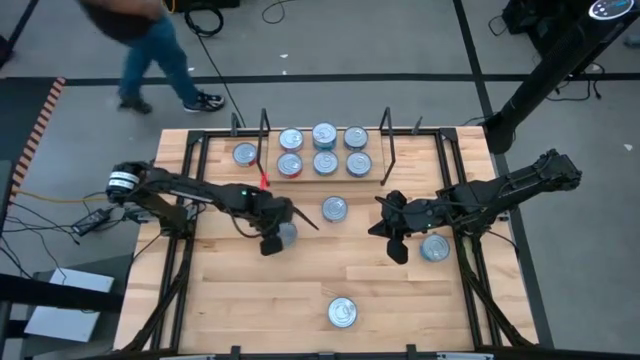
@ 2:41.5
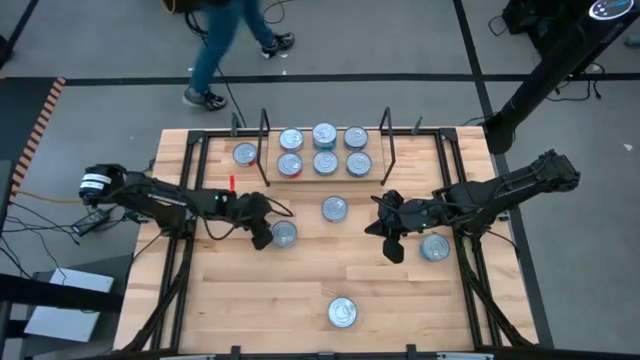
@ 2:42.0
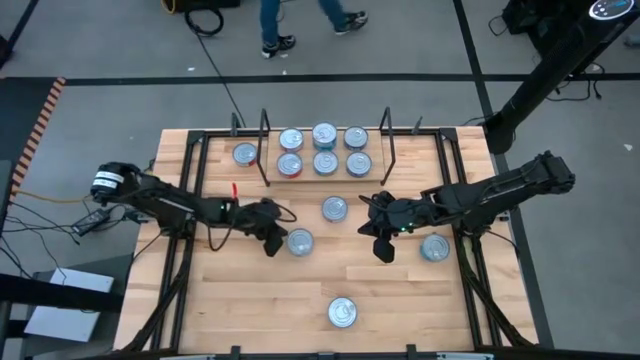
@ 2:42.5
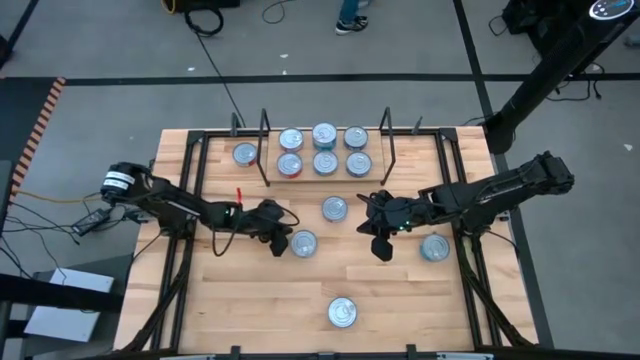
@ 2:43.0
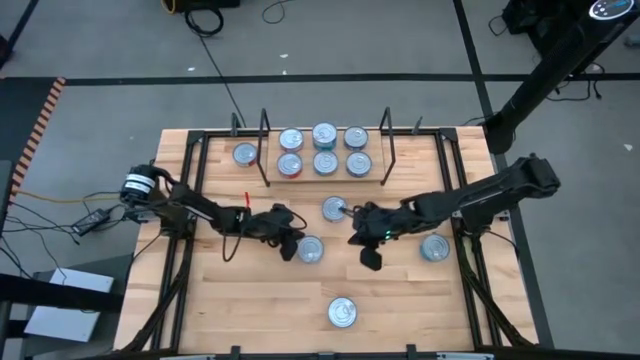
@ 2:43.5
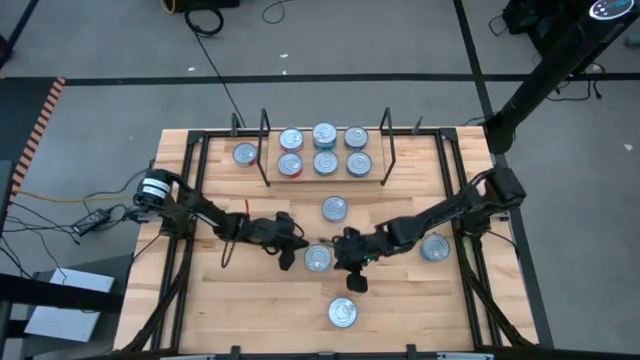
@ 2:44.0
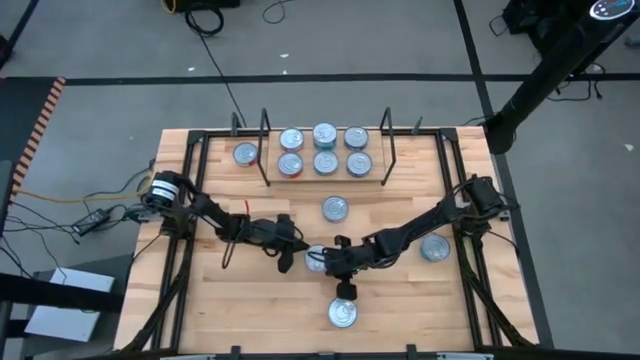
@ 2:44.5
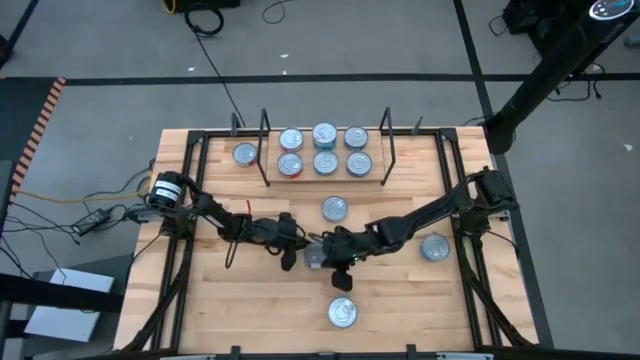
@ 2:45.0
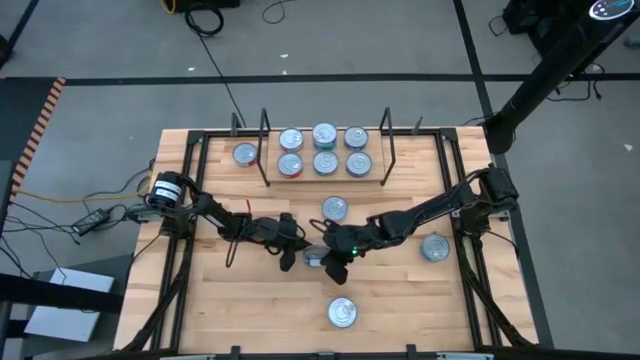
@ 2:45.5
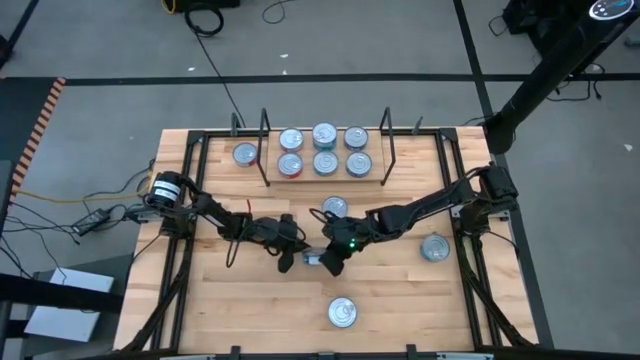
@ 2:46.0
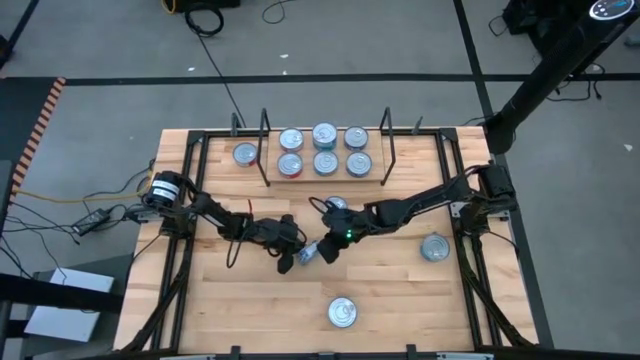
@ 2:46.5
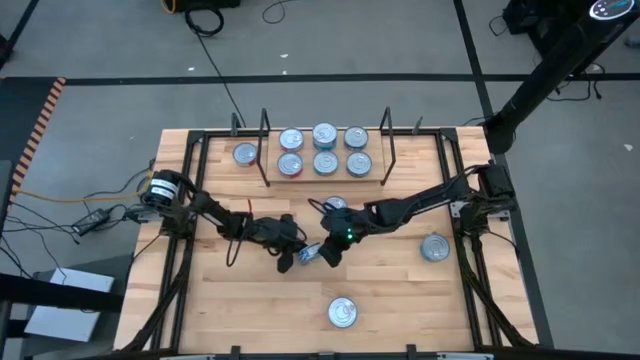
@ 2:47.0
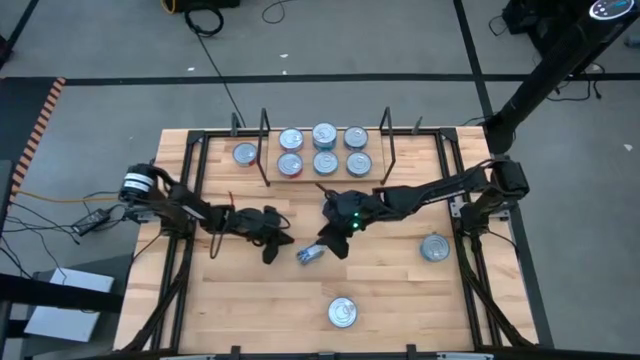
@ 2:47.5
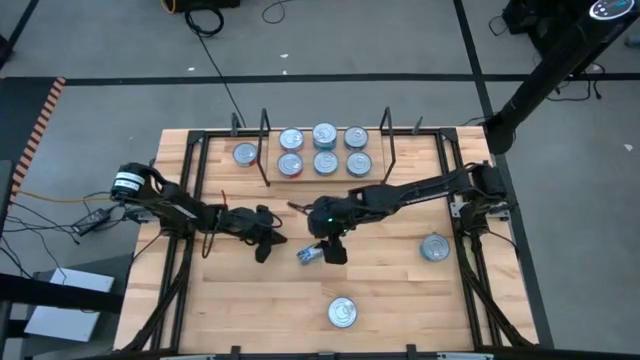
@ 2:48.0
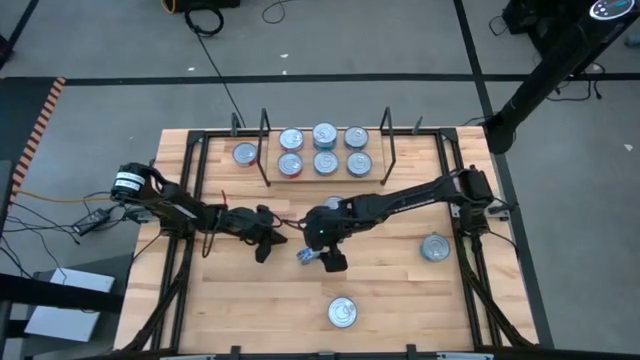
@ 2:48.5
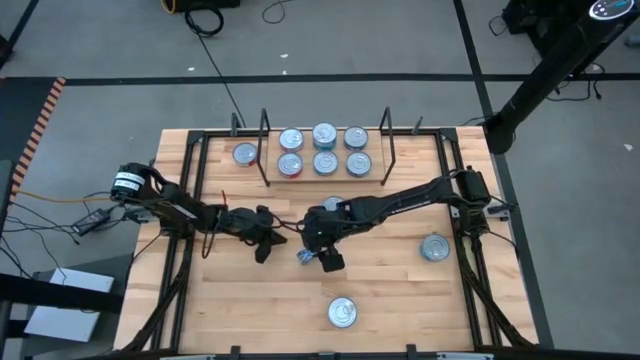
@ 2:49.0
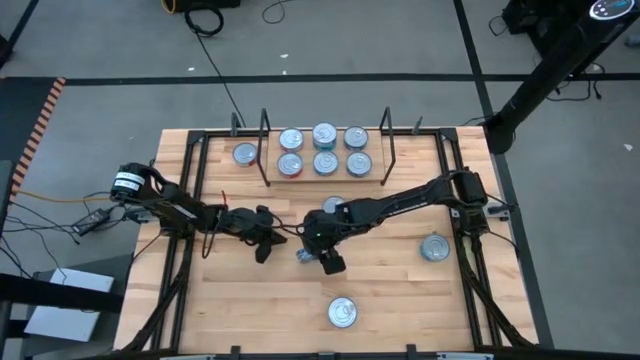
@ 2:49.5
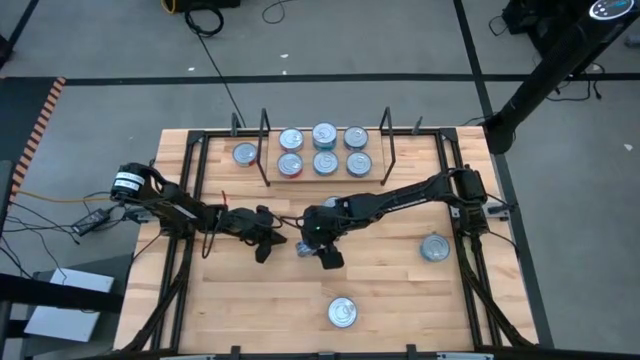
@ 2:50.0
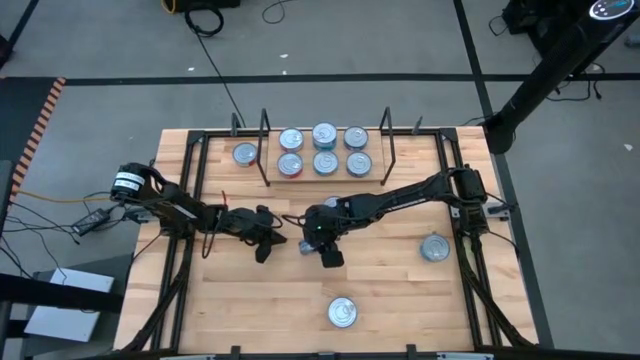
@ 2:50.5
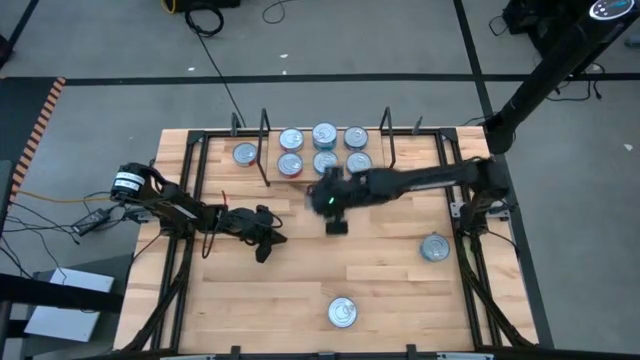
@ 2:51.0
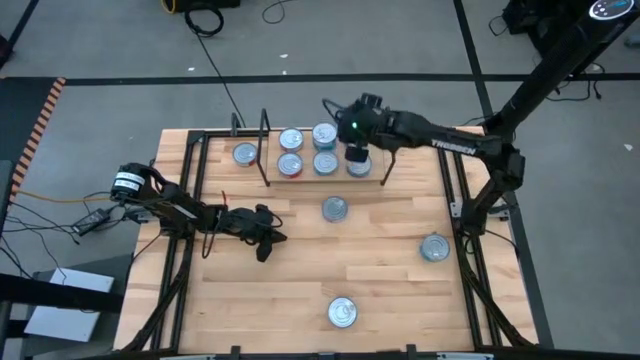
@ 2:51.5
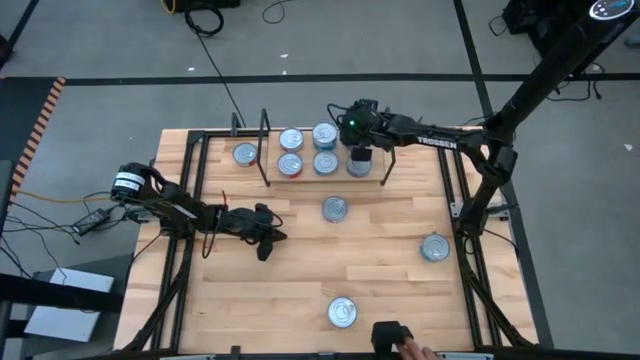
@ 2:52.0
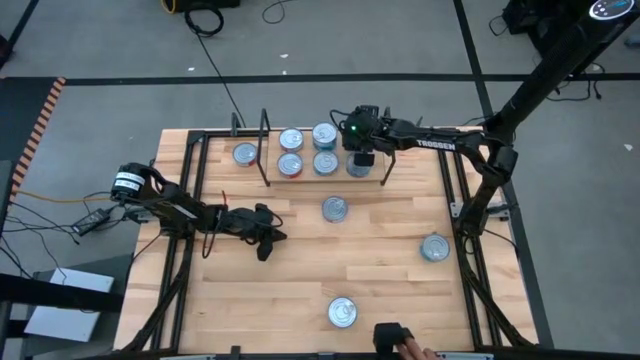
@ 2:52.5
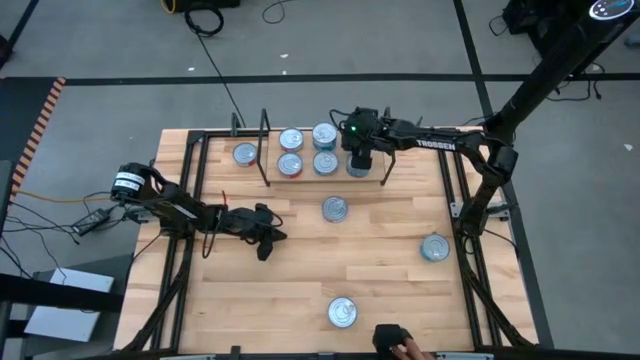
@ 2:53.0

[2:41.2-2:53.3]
Task: Stack canned seafood by type on shelf
Stack the blue tuna can on top of the other blue tuna can on the shelf

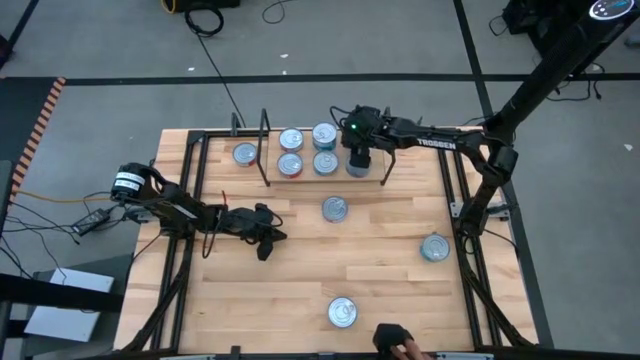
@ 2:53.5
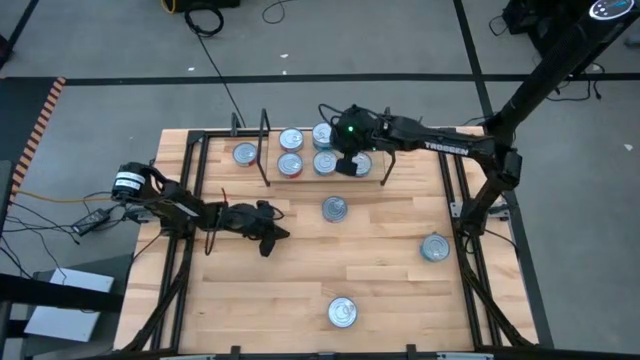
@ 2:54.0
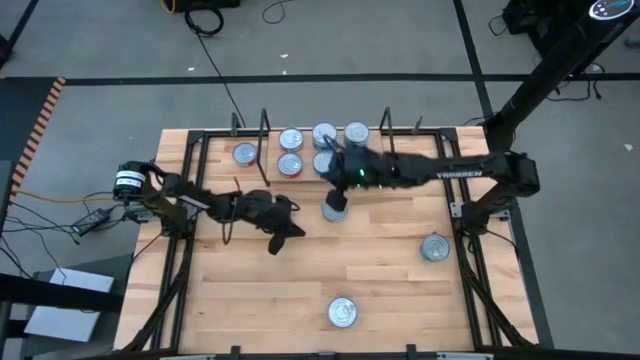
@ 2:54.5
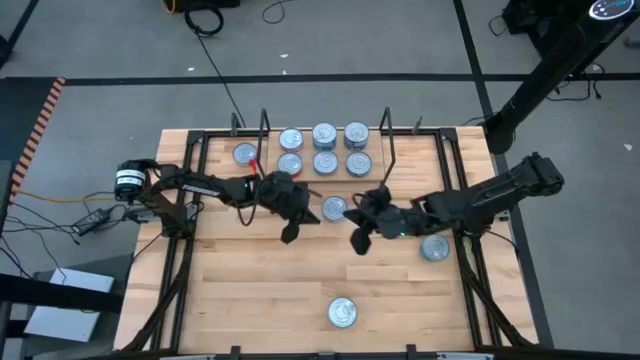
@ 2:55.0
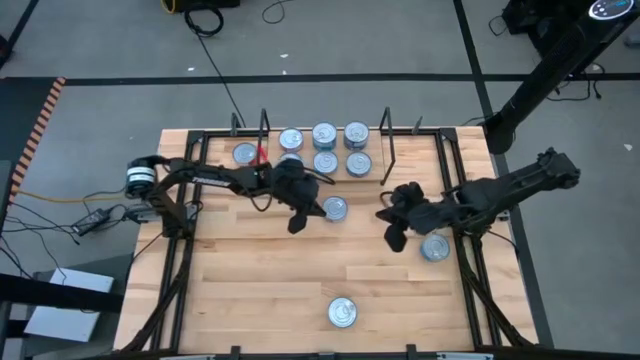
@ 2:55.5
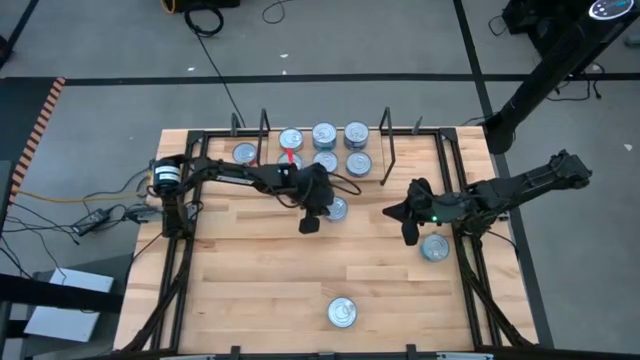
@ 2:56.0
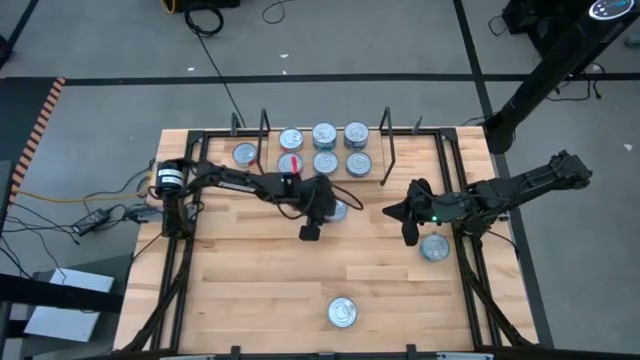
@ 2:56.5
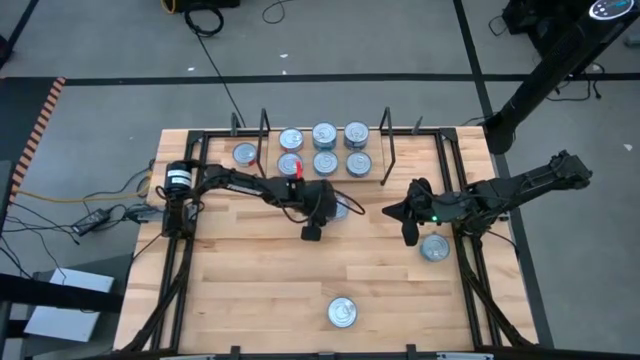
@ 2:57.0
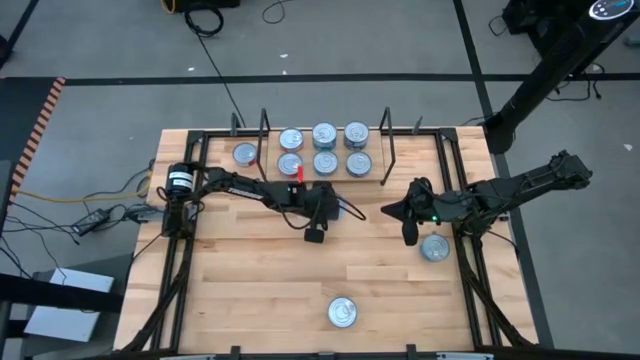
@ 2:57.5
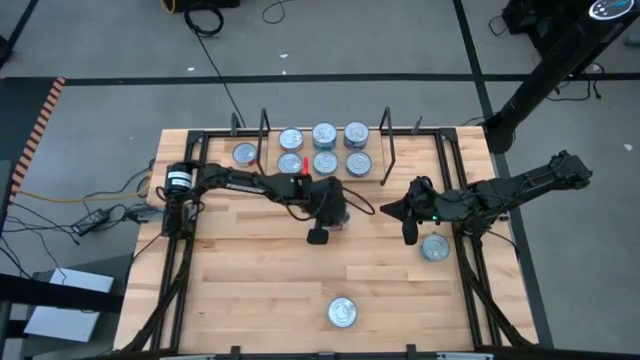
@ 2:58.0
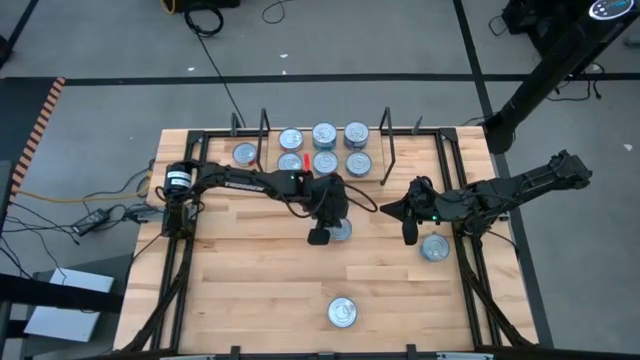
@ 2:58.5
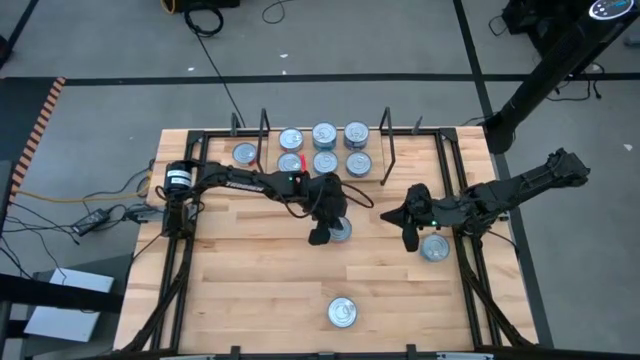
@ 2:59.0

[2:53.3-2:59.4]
Stack the red tuna can on top of the other red tuna can on the shelf

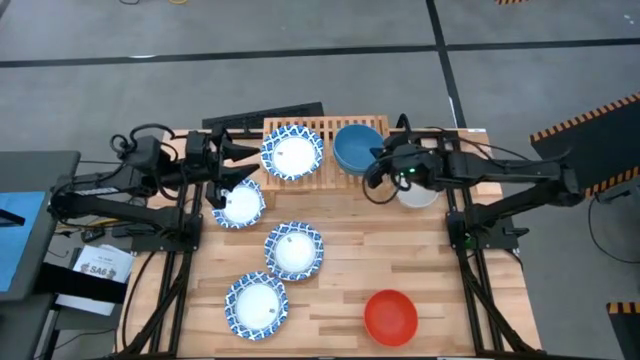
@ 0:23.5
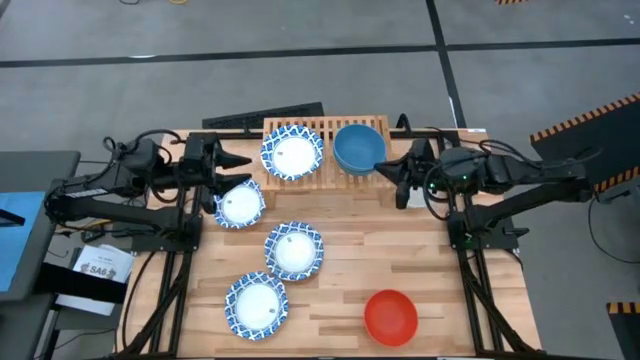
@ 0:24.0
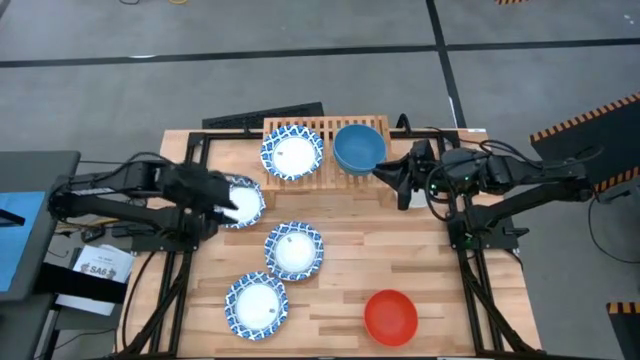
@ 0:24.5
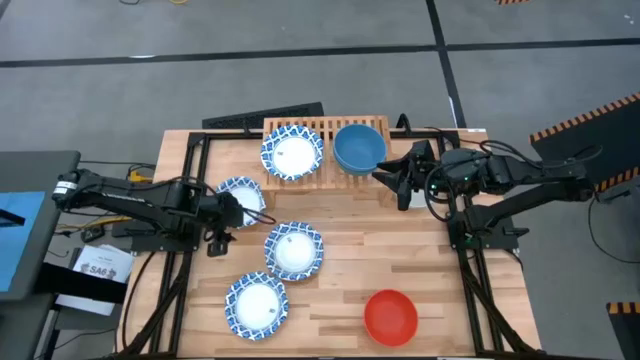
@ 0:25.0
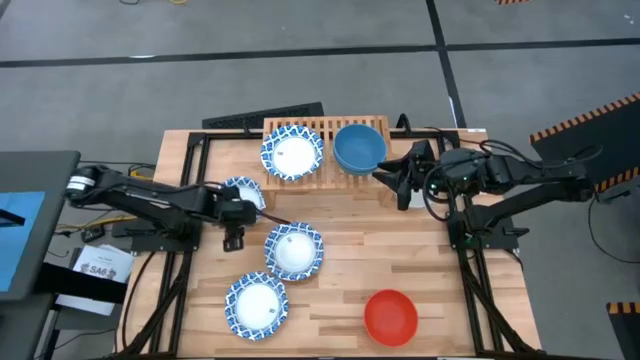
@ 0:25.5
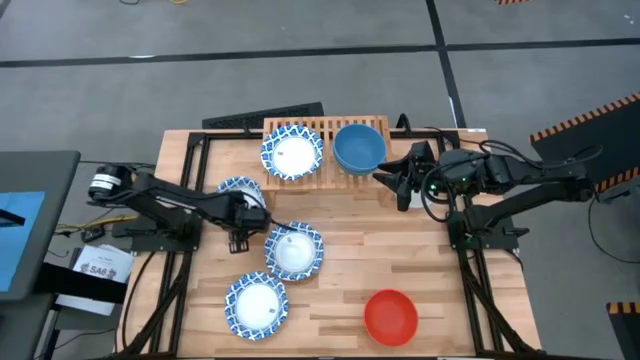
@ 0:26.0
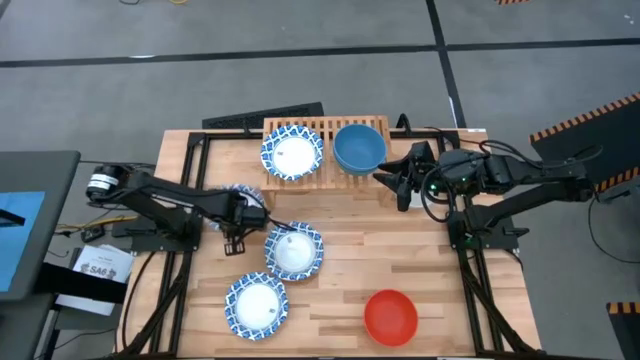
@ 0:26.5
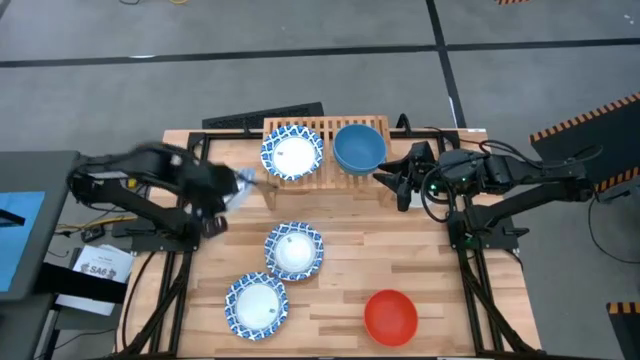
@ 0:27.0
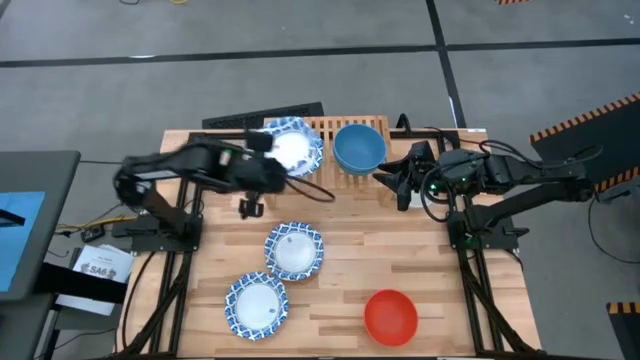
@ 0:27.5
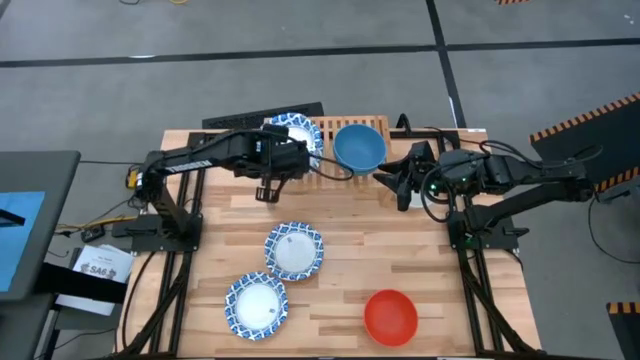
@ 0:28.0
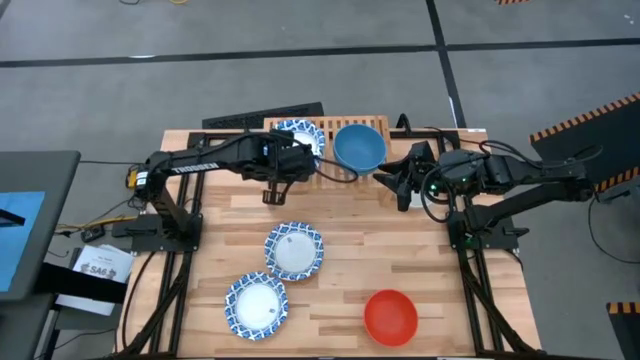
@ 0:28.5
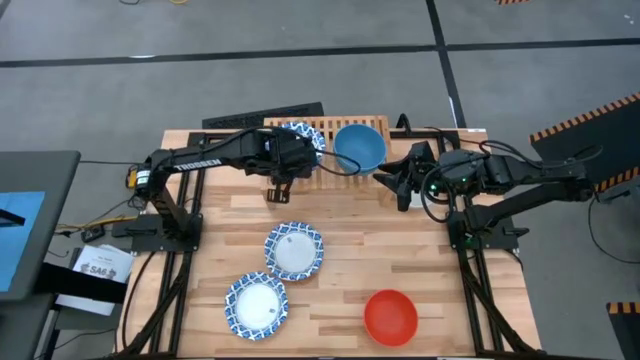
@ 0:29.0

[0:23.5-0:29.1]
Task: Place and stack bowls onto a shelf
Stack the white blue bowl on top of the white blue bowl on the shelf
